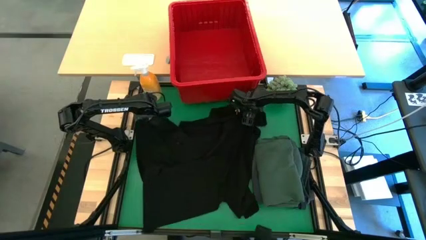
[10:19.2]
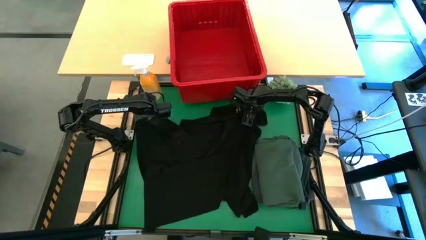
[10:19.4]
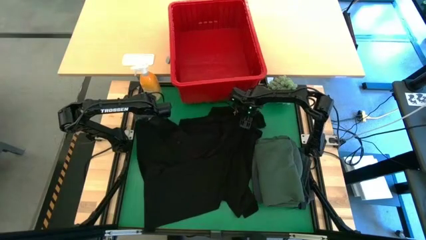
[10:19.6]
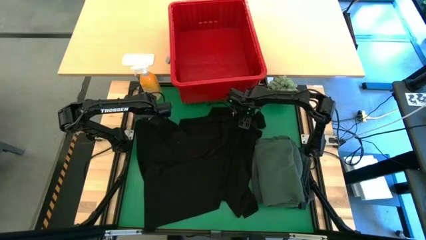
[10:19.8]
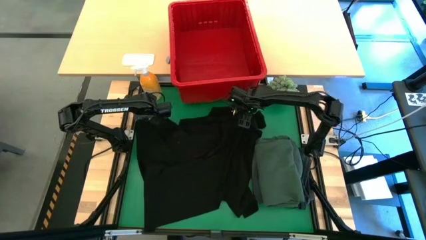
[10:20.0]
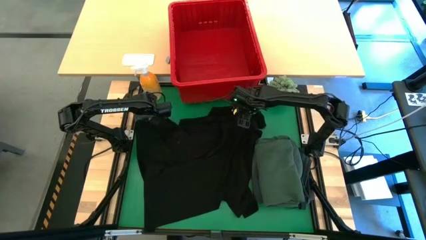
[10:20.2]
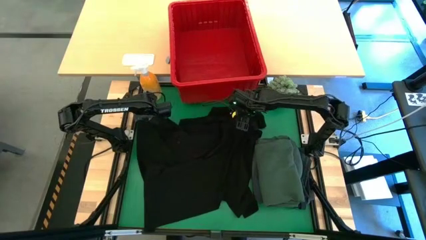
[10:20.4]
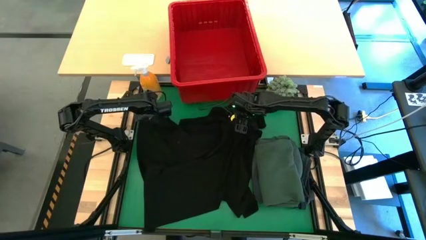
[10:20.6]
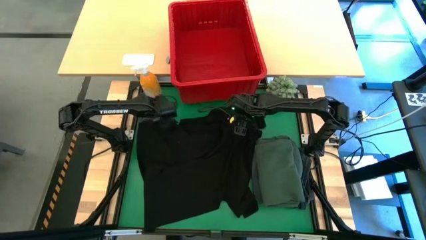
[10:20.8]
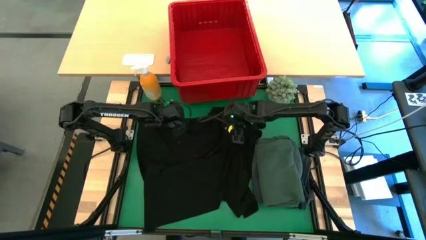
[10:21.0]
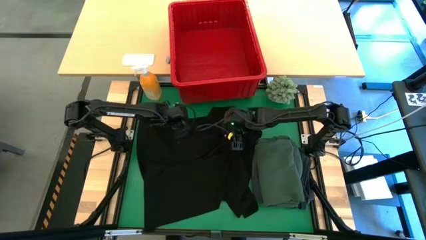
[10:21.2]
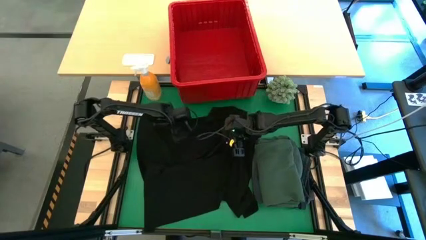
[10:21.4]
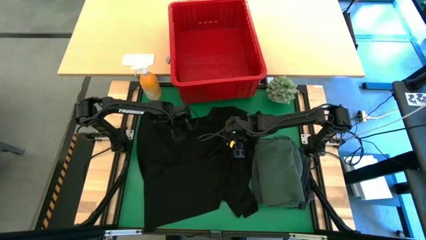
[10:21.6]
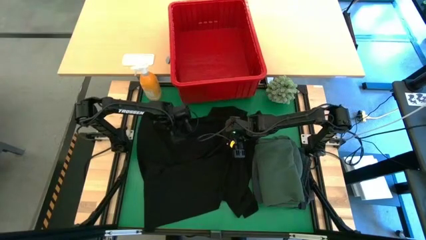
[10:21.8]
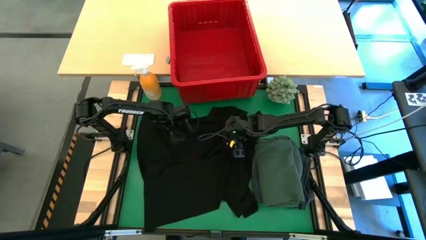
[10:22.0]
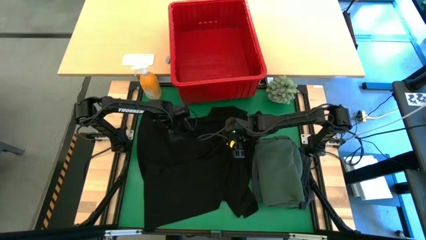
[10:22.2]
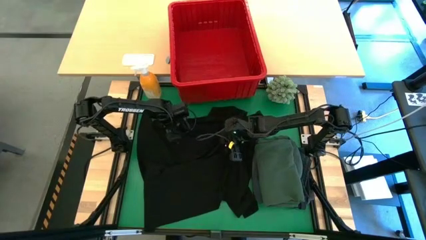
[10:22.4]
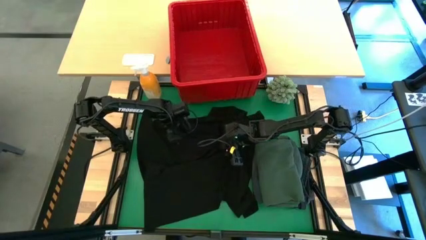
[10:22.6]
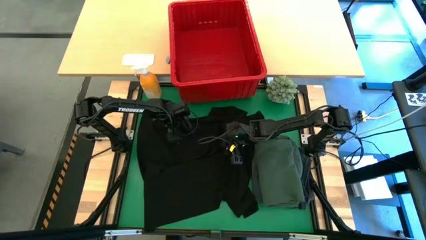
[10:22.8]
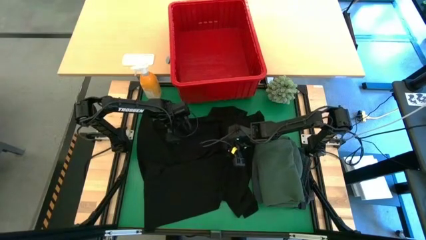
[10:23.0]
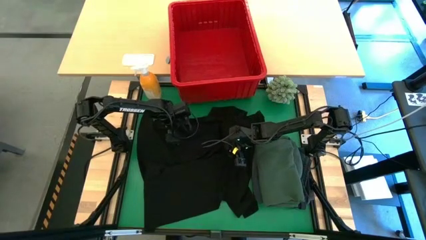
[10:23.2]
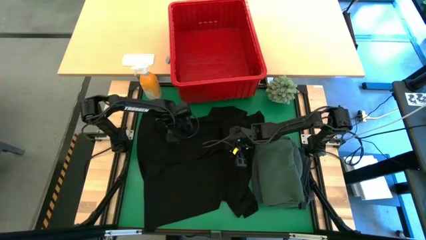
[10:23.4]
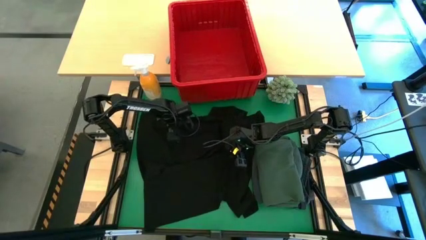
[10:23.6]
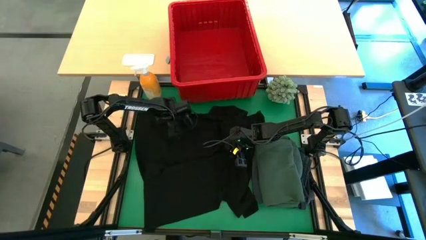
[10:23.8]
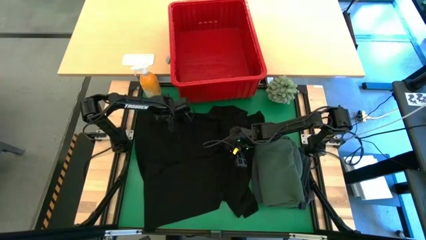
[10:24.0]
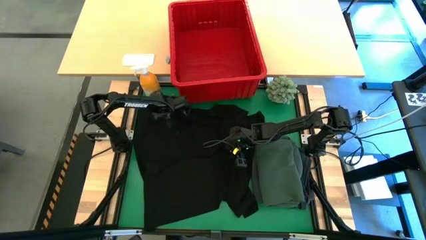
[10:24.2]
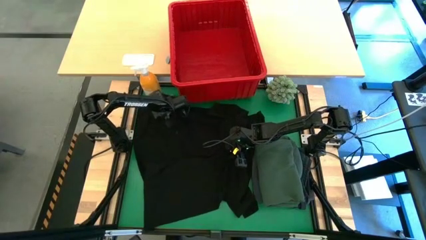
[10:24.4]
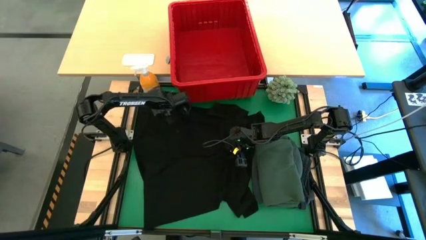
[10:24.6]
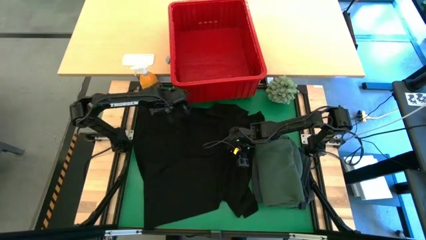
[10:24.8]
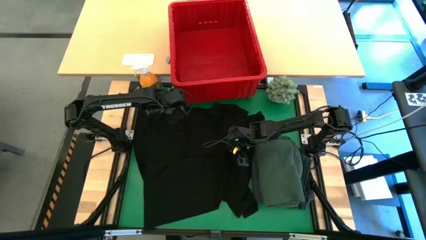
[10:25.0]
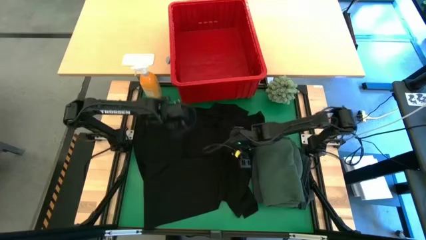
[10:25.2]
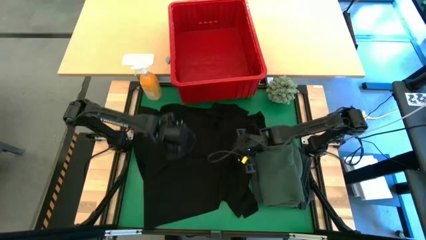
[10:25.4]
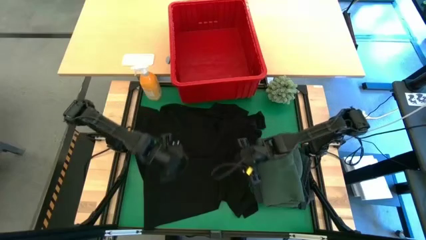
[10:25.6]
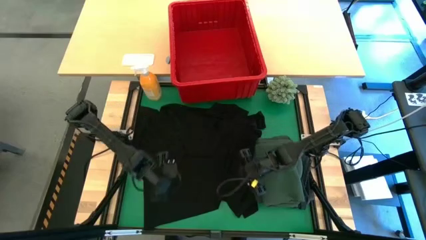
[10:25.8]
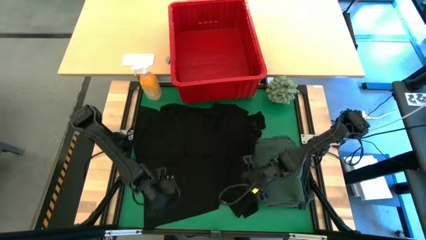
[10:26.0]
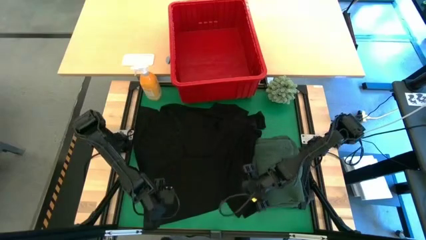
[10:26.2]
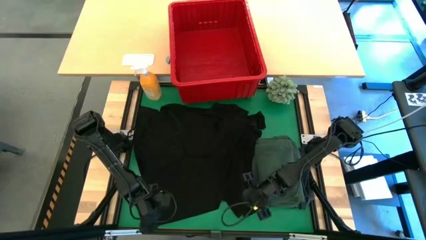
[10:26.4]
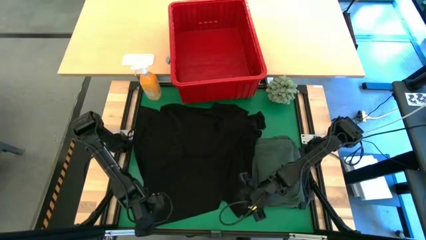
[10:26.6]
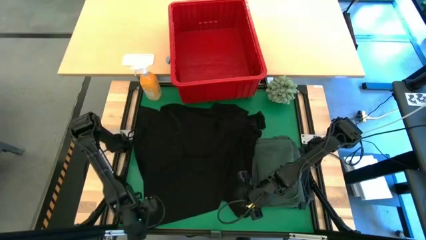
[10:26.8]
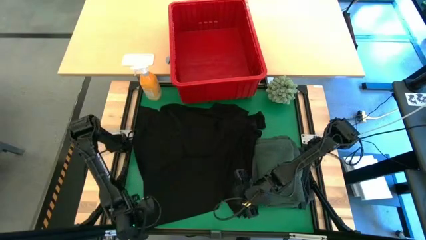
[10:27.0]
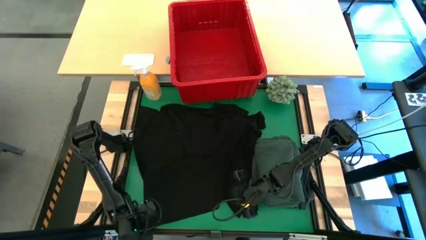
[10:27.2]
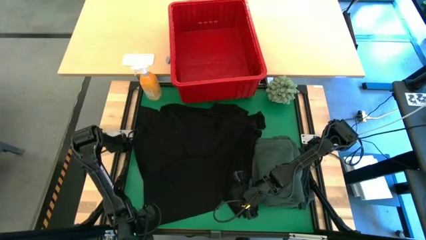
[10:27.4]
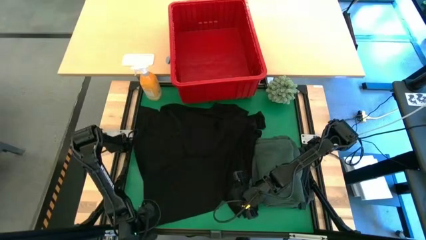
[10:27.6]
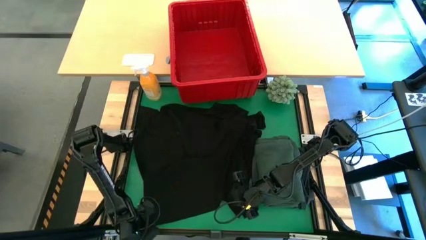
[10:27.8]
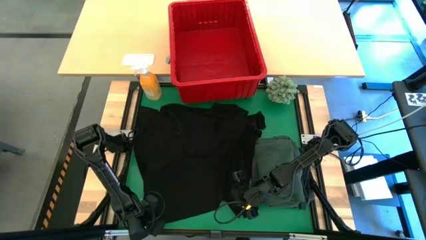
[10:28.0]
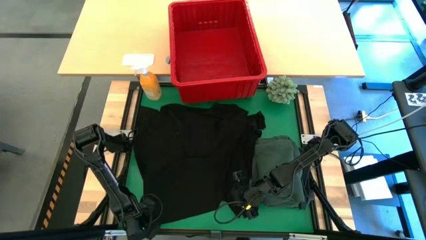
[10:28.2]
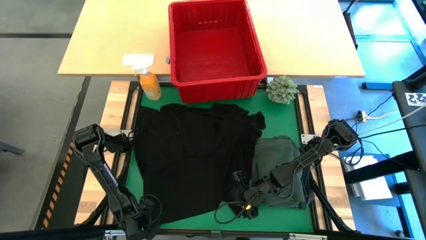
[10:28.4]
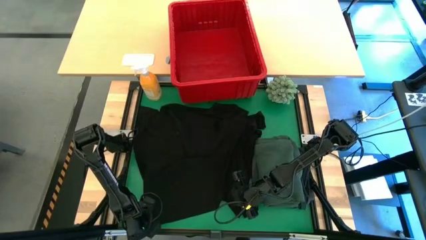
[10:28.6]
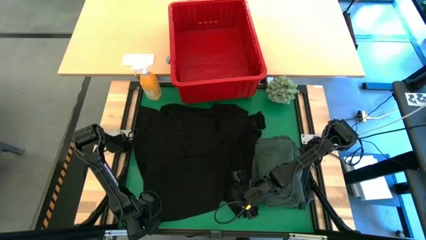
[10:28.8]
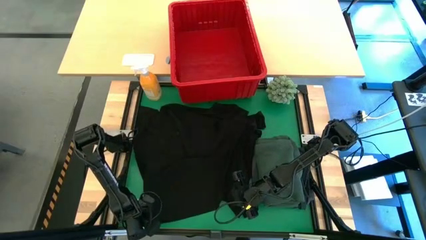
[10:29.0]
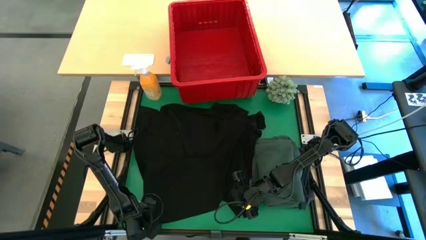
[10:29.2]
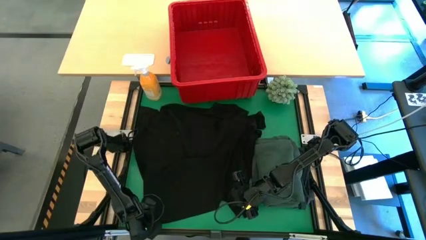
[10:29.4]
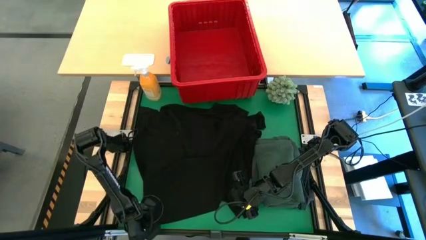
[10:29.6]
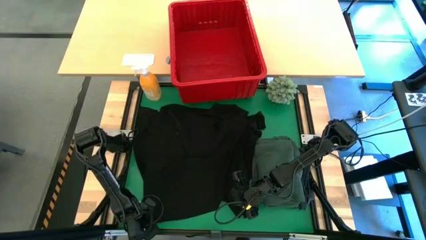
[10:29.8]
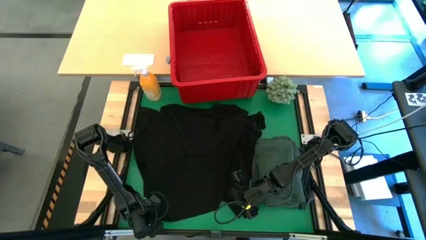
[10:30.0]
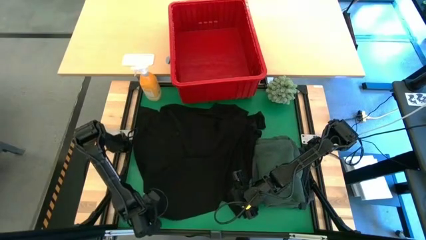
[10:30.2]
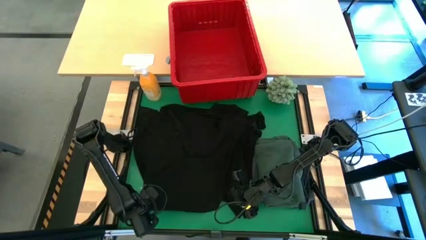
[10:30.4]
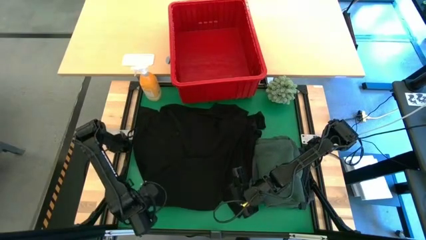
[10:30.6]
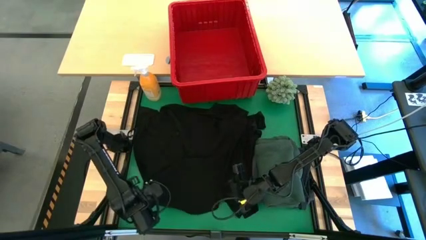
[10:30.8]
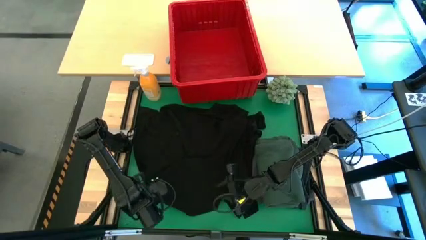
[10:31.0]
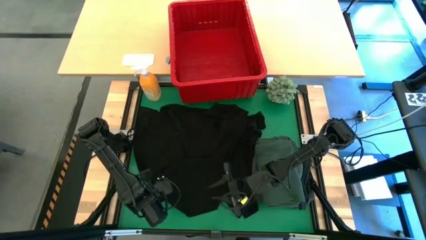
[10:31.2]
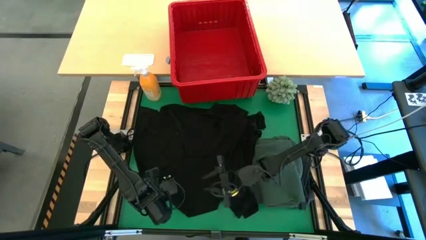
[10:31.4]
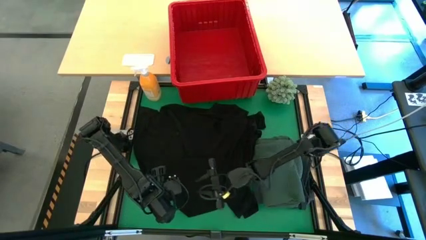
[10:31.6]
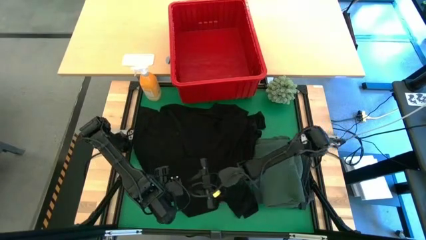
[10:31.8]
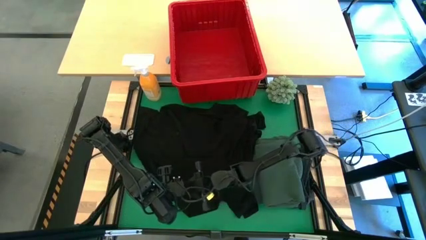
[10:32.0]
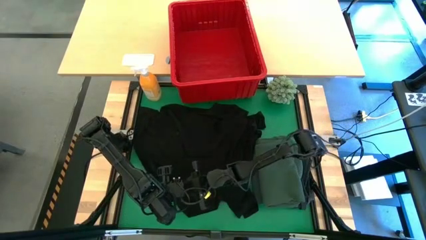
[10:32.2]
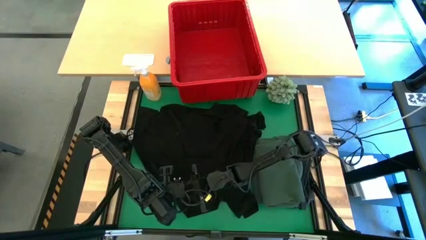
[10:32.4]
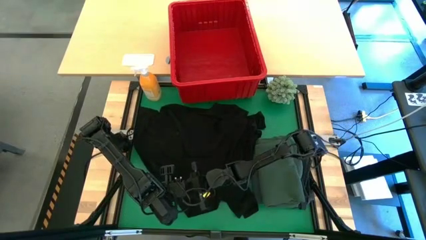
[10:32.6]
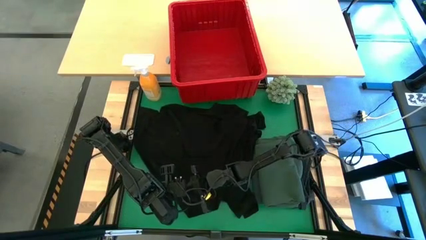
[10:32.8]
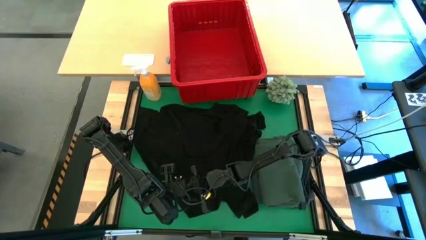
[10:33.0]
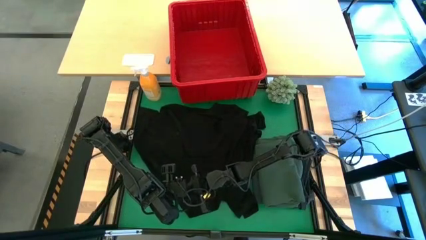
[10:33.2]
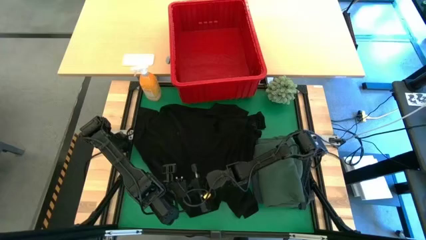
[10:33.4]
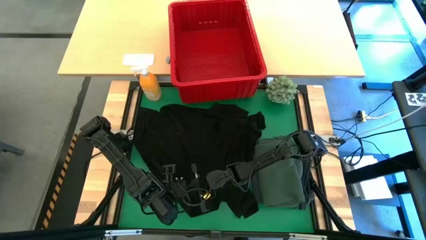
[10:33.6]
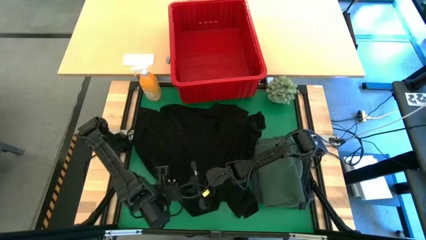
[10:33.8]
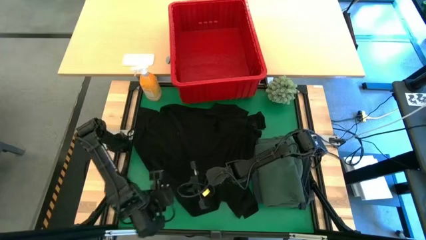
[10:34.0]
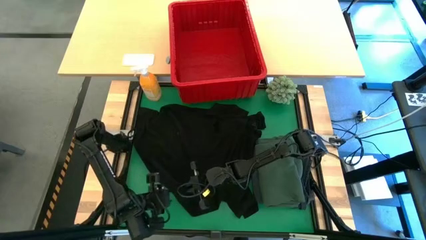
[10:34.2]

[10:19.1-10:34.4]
Task: Fold Laundry from Bin
Fold the black shirt

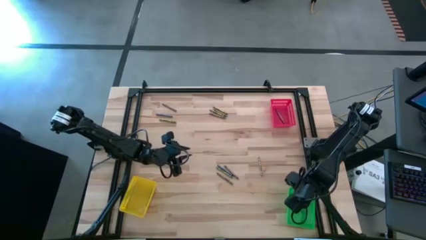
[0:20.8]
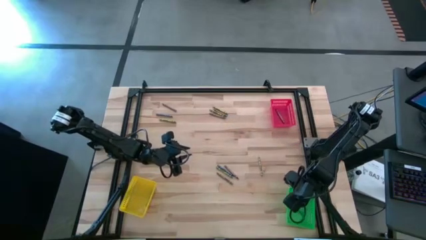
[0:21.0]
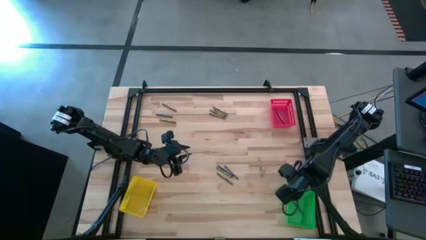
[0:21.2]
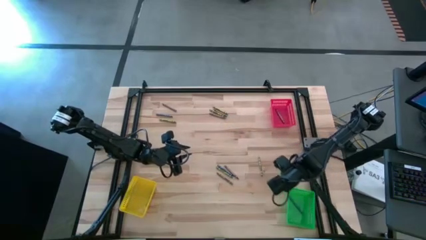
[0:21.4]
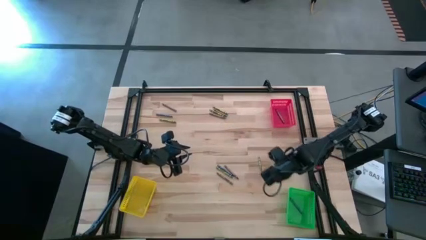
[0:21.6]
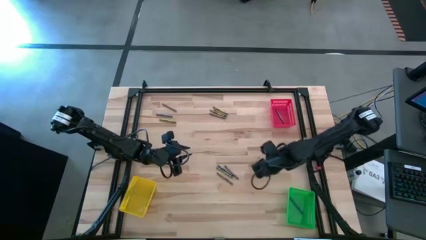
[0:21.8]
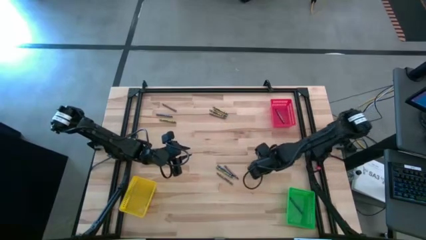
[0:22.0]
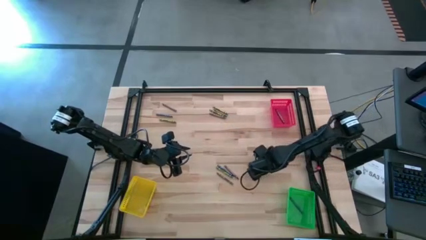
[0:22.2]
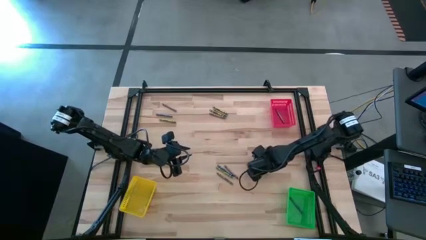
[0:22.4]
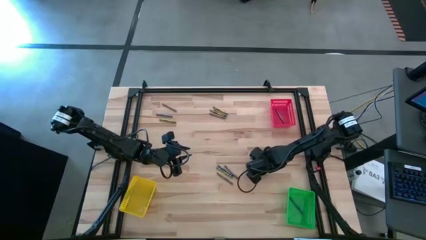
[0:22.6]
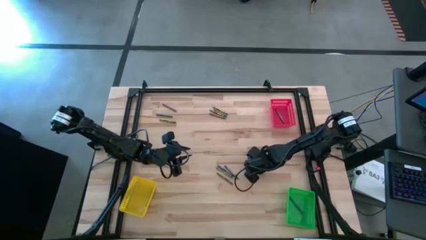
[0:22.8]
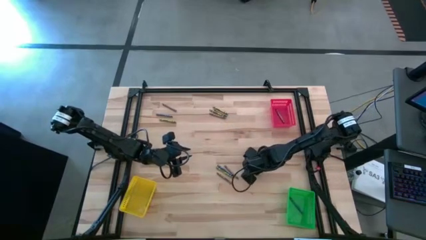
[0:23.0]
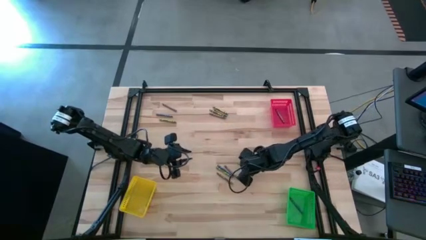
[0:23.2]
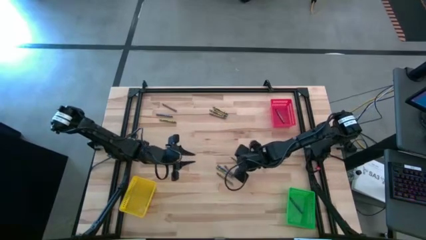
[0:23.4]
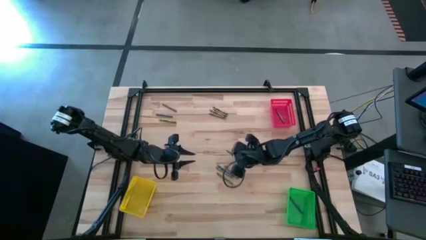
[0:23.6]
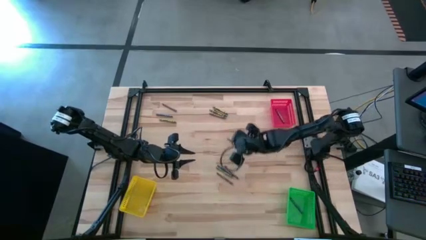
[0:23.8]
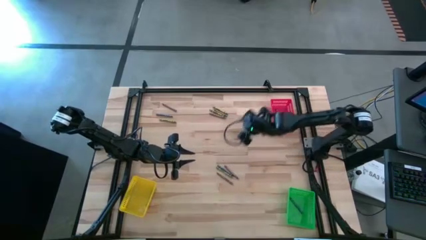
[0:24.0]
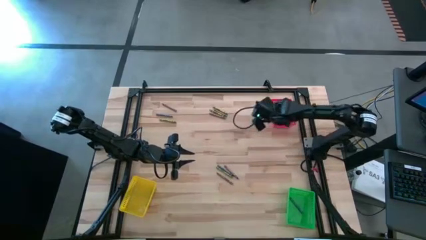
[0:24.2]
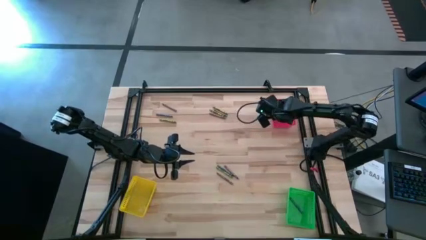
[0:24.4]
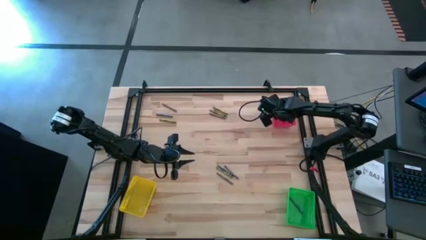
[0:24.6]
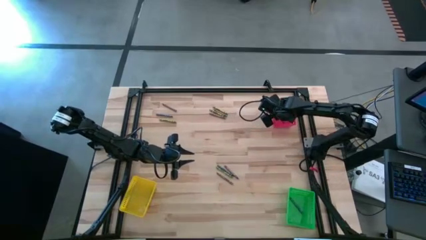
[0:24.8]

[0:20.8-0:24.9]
Task: Sort crayons
Put the green crayon into the red bin
